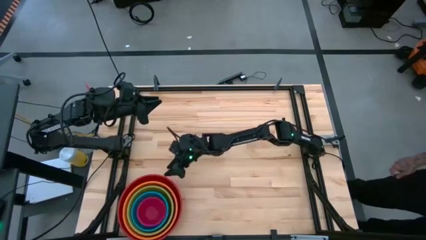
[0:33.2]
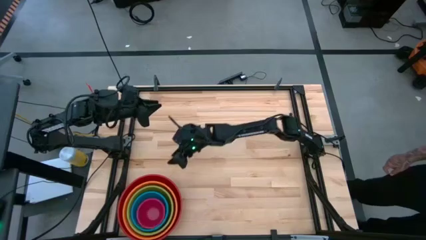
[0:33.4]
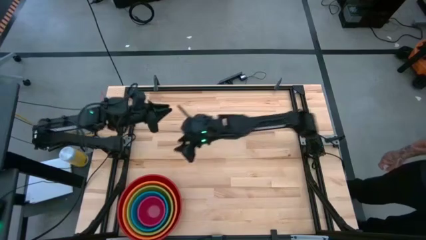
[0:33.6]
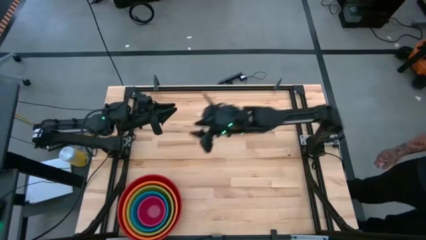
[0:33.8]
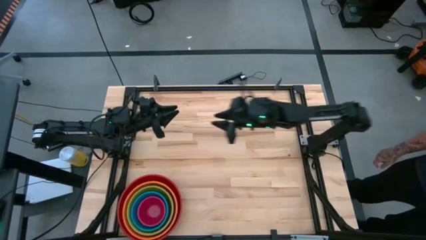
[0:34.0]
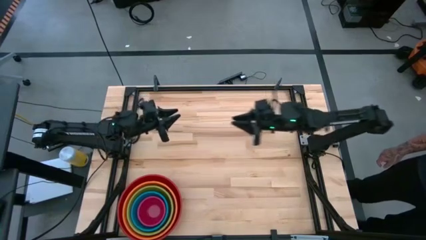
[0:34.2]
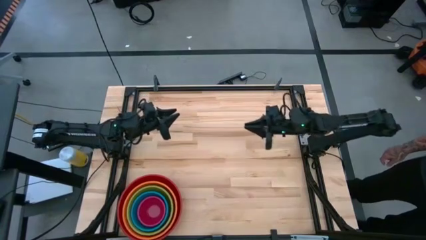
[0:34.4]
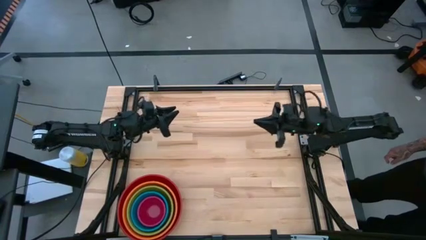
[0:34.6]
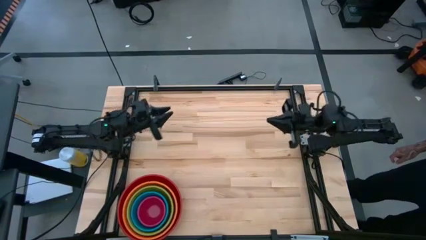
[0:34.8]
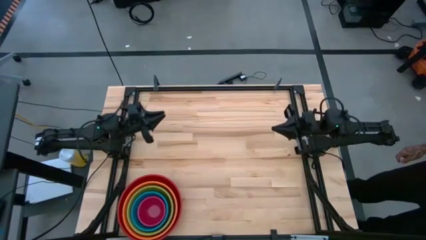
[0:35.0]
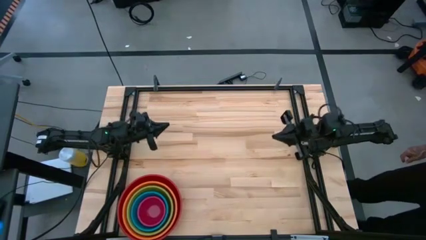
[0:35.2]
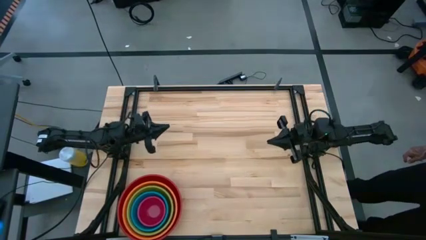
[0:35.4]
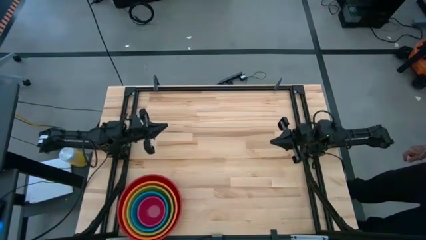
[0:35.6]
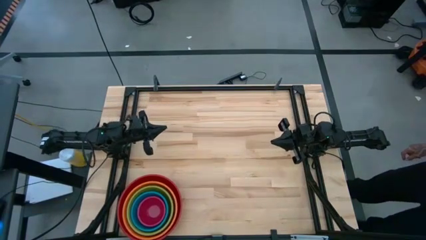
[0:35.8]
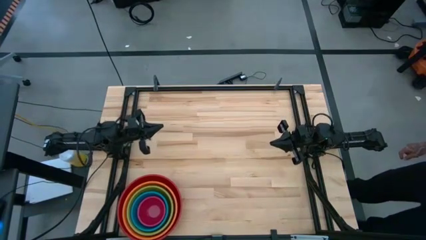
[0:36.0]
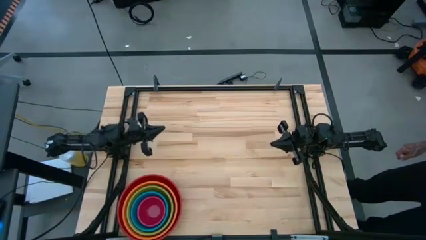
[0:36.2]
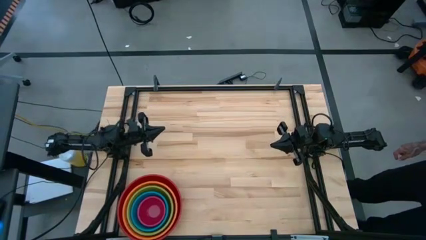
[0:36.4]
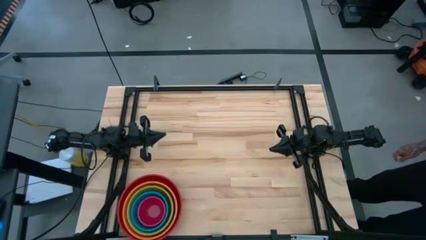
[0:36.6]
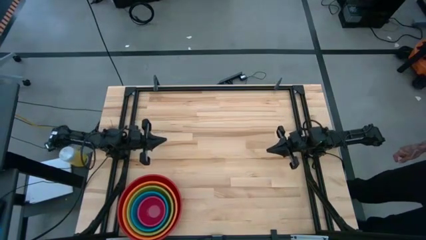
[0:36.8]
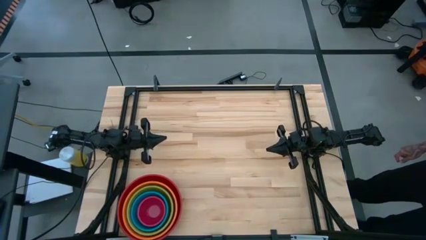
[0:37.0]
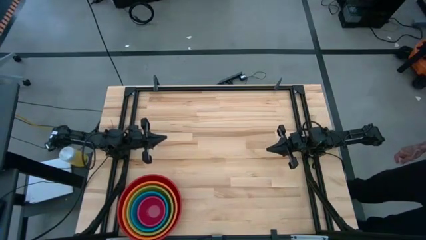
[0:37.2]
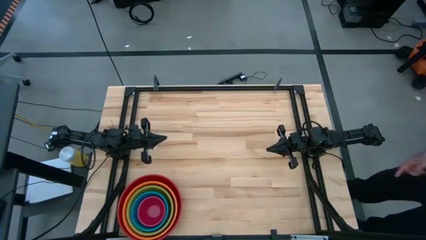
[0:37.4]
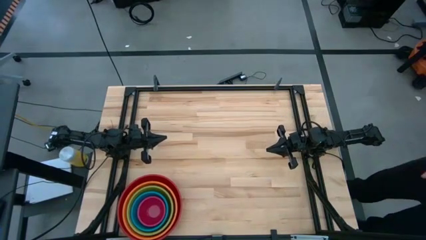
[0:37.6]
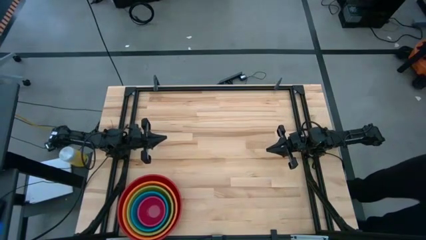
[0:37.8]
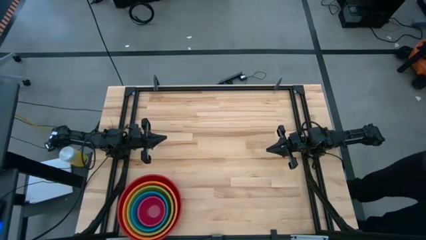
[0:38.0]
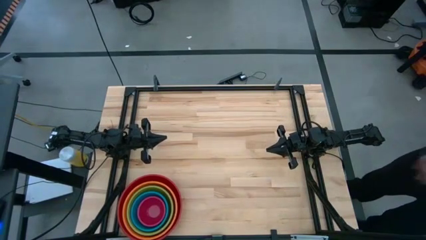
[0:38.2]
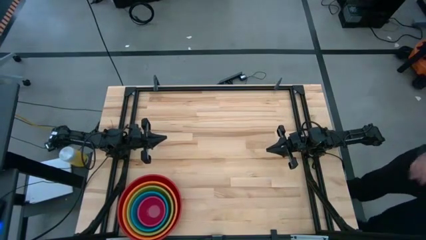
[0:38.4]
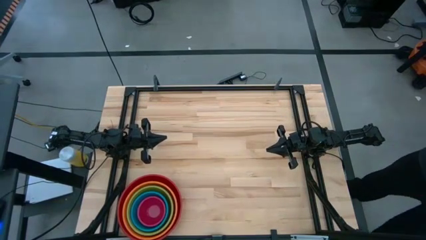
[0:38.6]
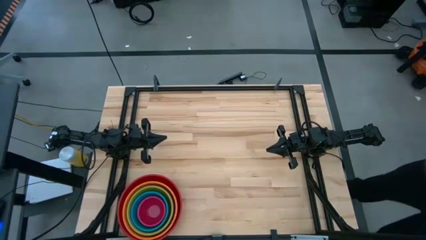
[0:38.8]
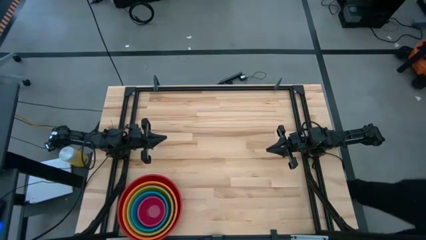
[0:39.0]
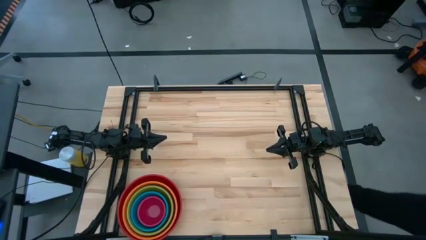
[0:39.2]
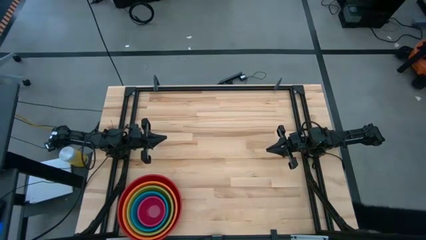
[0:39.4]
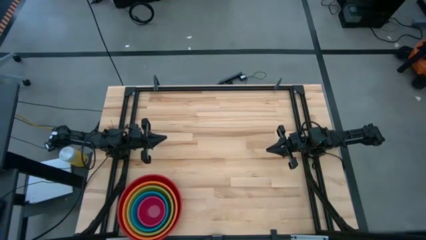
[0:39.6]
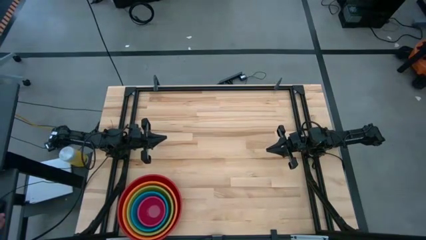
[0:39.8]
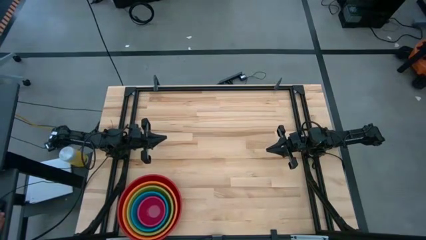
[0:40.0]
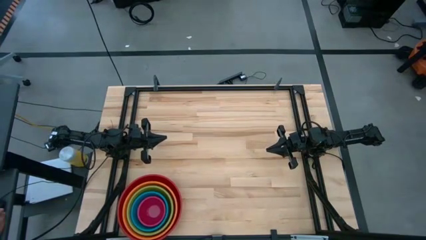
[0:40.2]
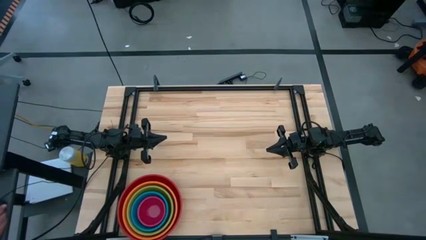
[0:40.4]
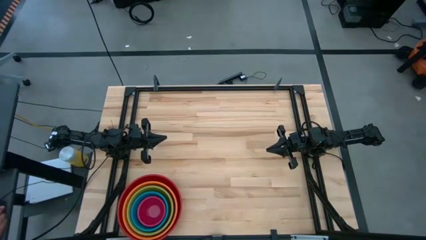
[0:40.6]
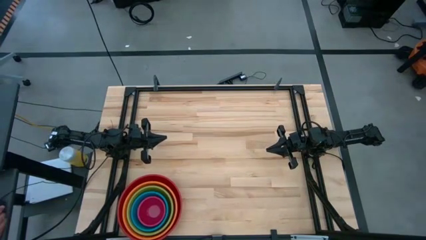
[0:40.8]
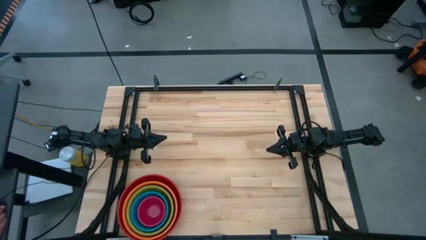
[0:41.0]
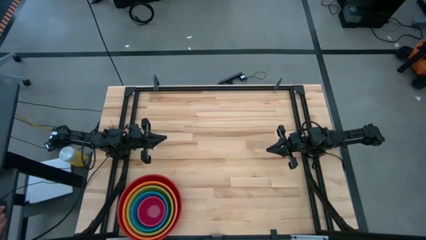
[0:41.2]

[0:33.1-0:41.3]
Return to Home Position

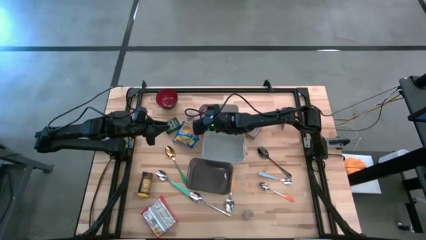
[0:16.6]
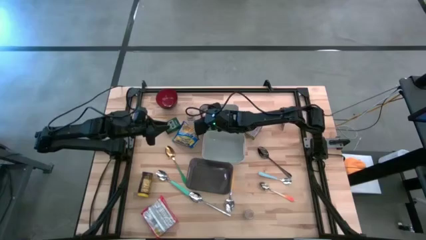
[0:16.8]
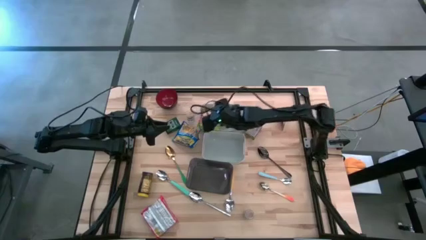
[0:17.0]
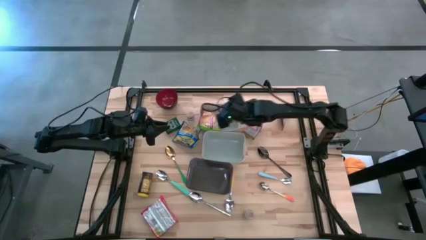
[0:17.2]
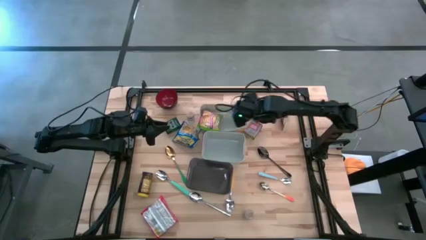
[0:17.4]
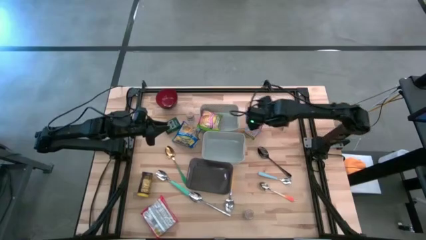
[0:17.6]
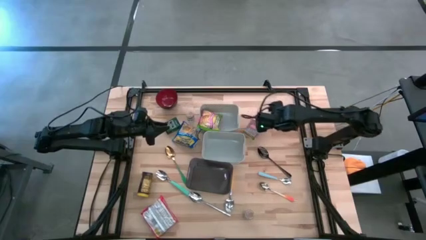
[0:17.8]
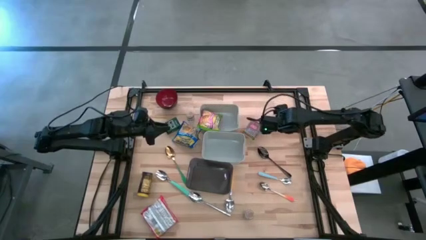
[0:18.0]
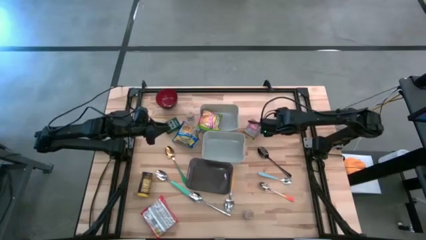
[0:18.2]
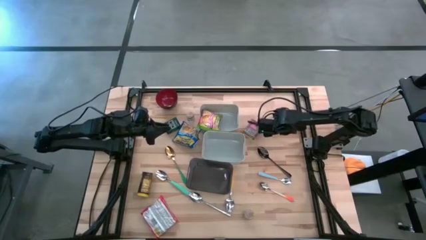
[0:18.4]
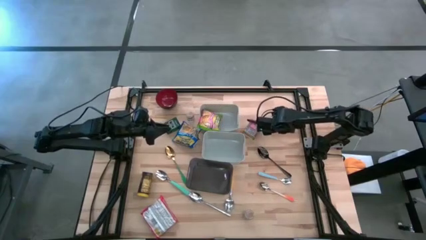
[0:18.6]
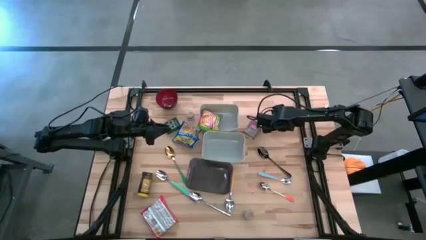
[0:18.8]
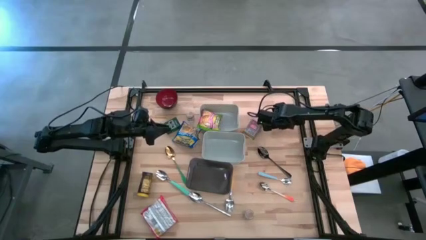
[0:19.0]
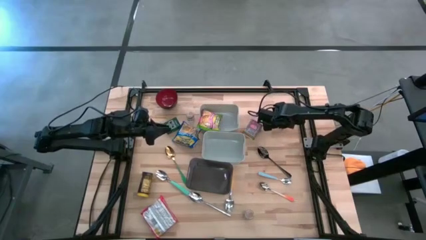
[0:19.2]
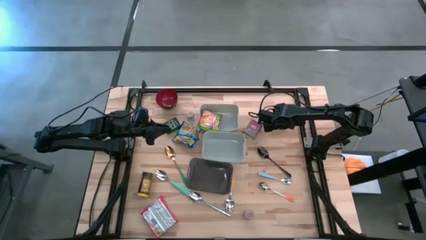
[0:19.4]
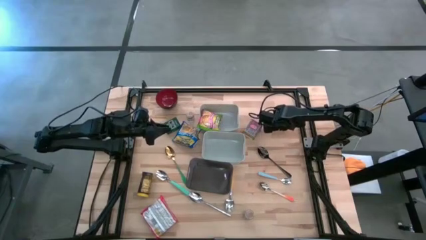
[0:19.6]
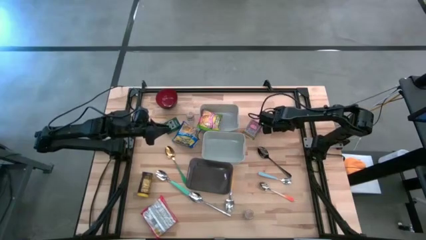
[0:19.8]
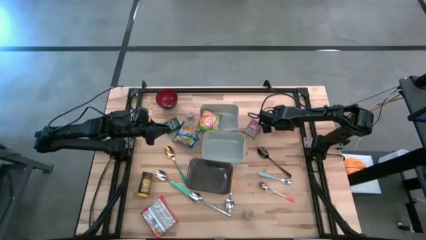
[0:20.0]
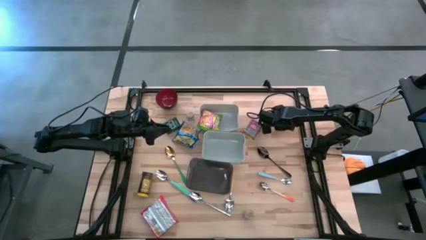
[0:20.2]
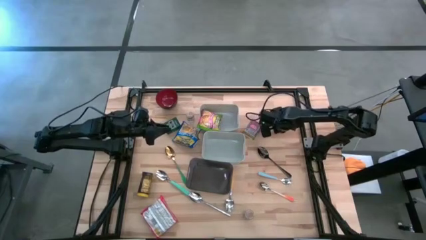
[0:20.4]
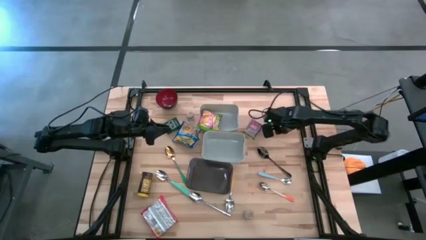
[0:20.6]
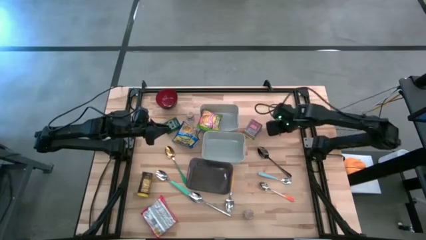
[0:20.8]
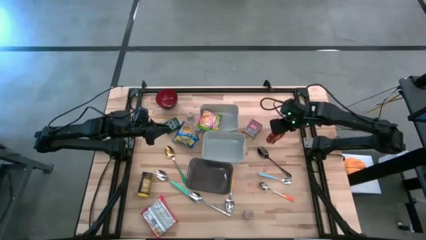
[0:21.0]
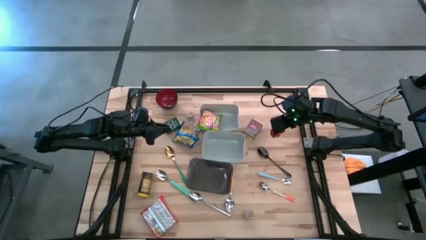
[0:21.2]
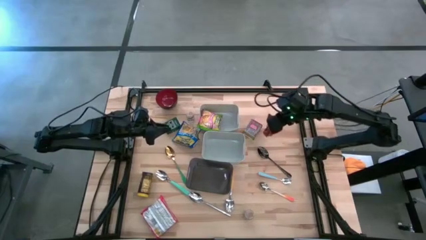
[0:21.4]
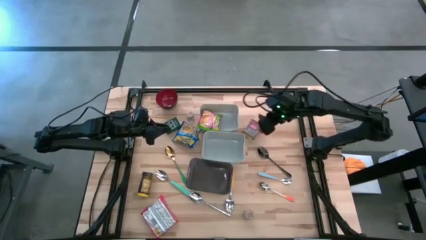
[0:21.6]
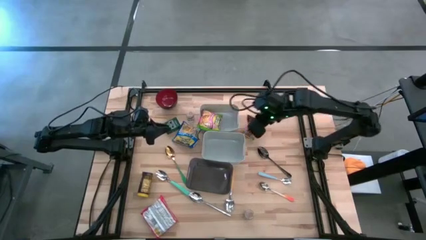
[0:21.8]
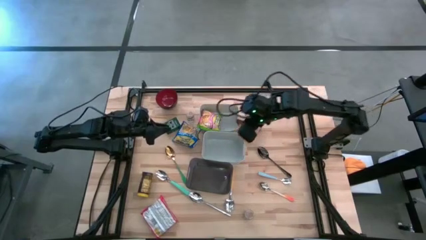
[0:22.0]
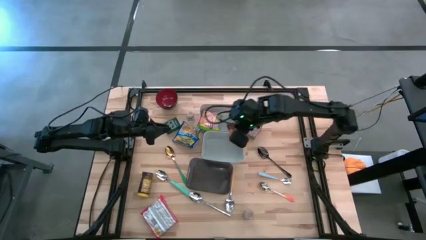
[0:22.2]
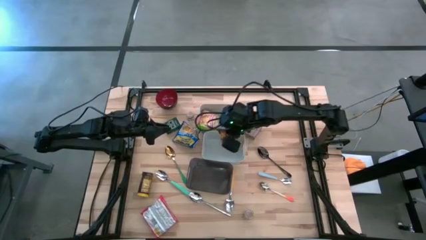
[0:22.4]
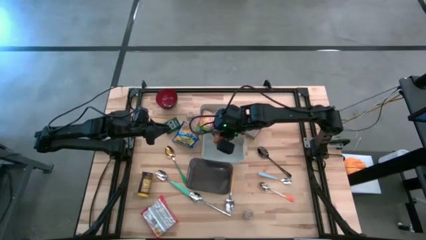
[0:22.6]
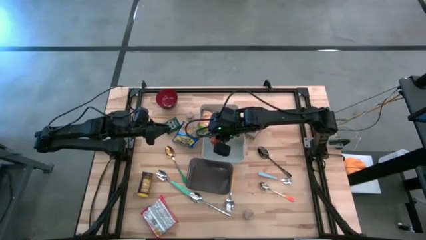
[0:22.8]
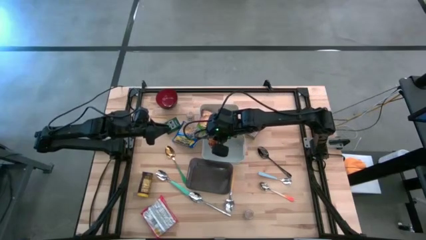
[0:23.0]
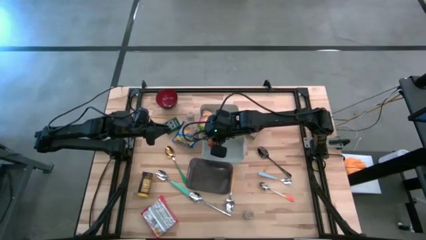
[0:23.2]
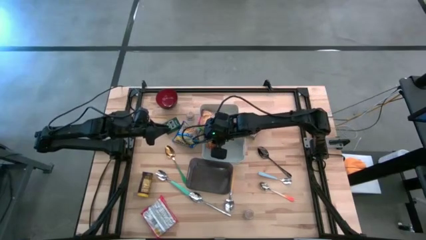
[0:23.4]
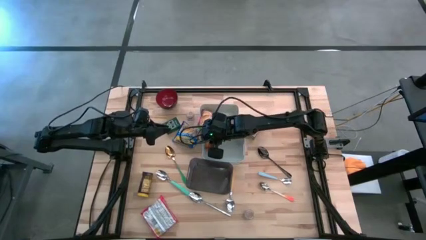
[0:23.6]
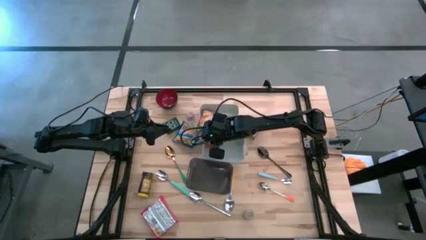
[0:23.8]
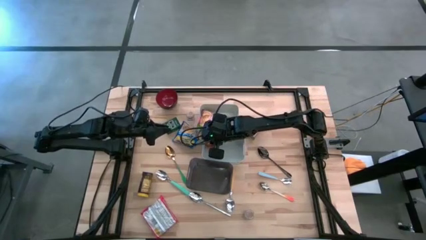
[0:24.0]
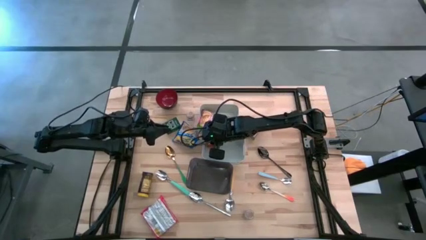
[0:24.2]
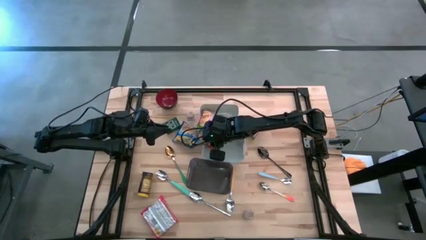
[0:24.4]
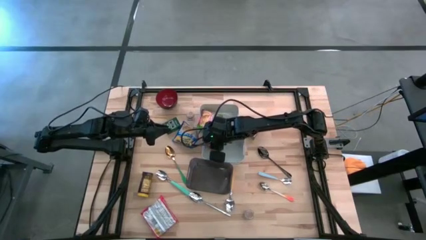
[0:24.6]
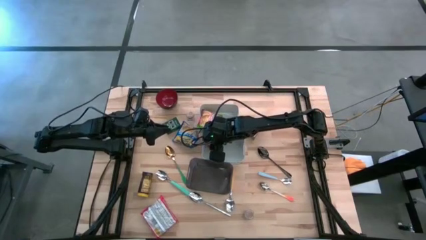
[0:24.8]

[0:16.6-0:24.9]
Put the orange seasoning pack into the bottom gray bin
